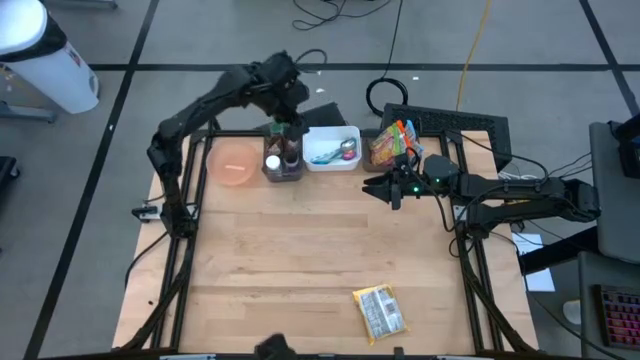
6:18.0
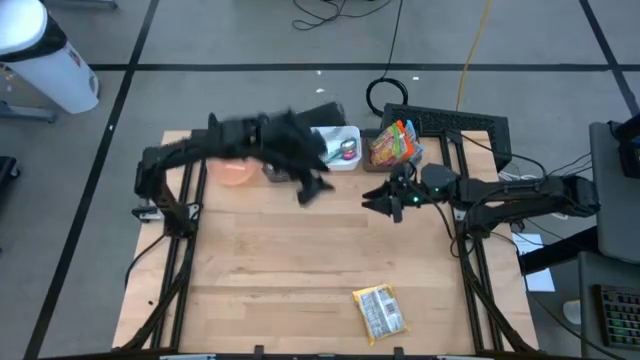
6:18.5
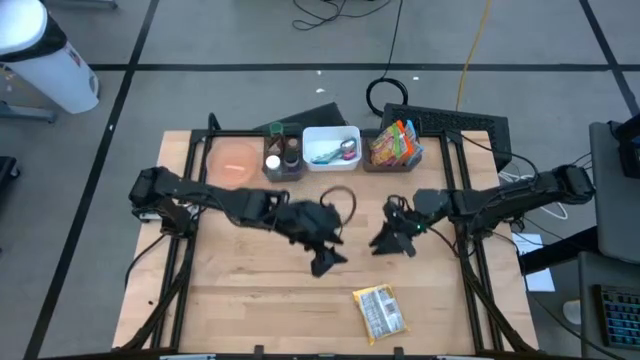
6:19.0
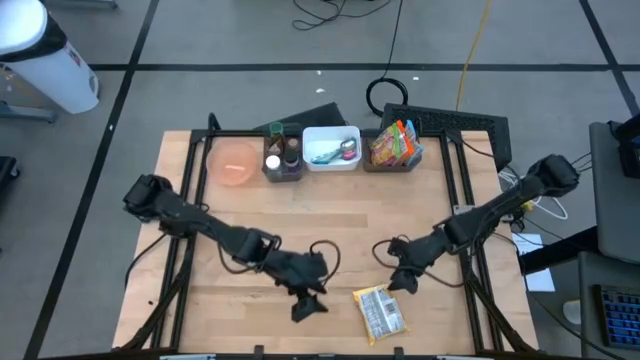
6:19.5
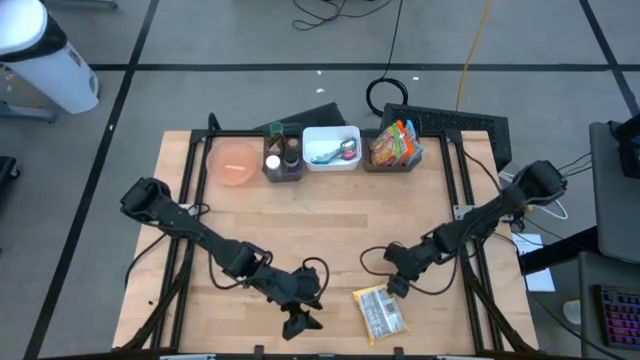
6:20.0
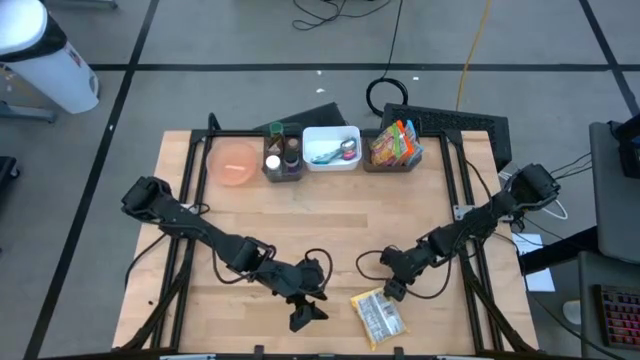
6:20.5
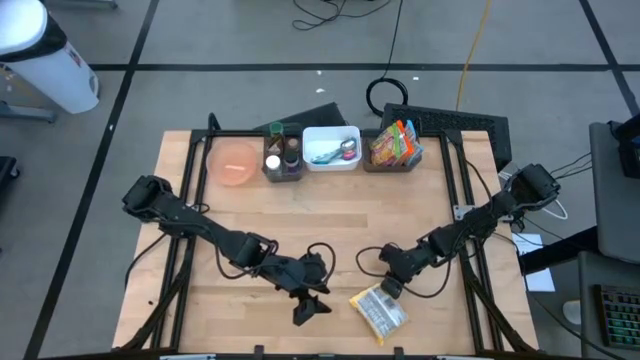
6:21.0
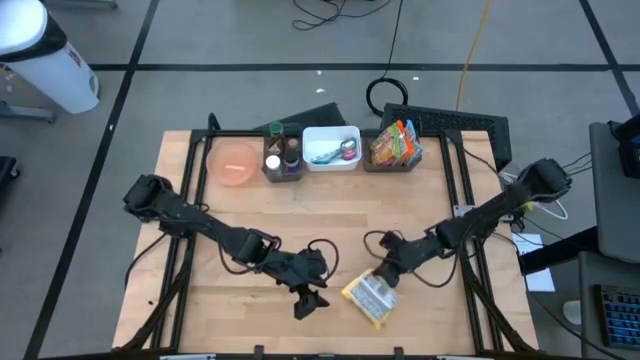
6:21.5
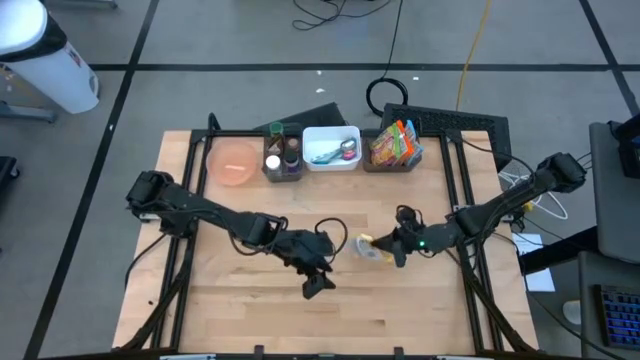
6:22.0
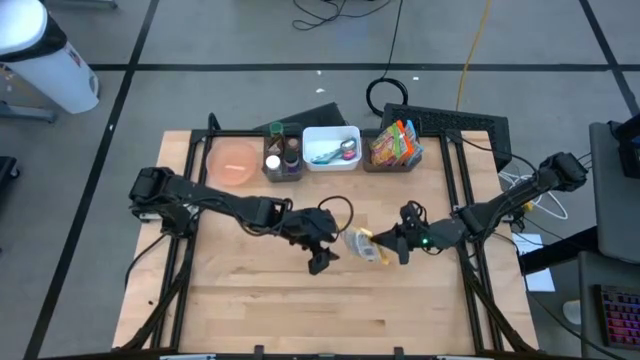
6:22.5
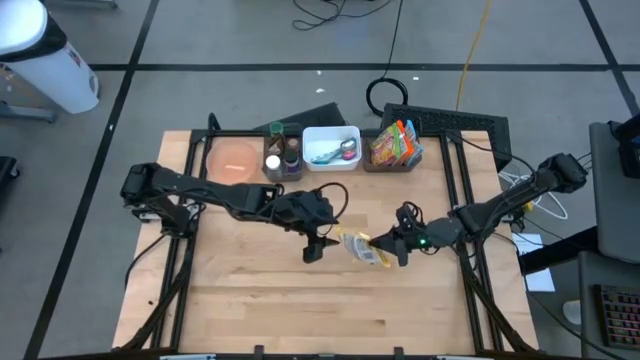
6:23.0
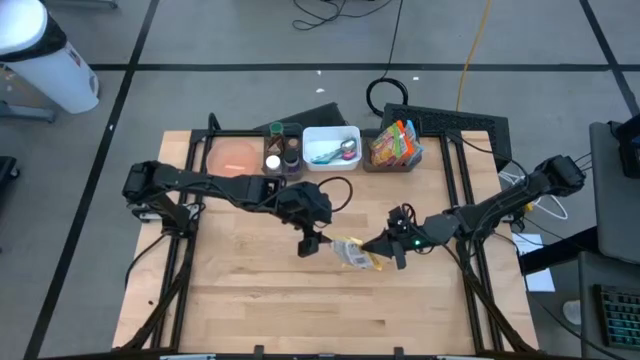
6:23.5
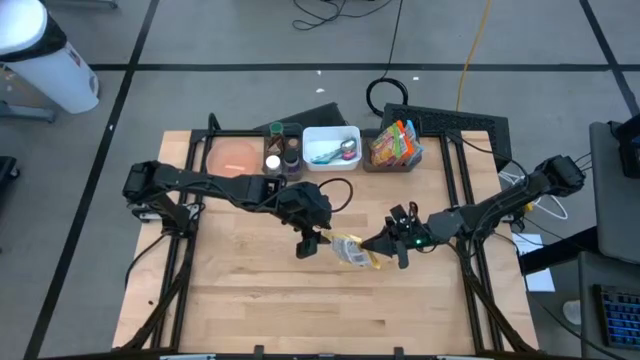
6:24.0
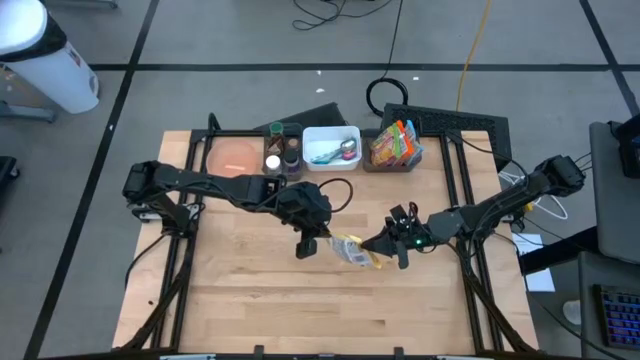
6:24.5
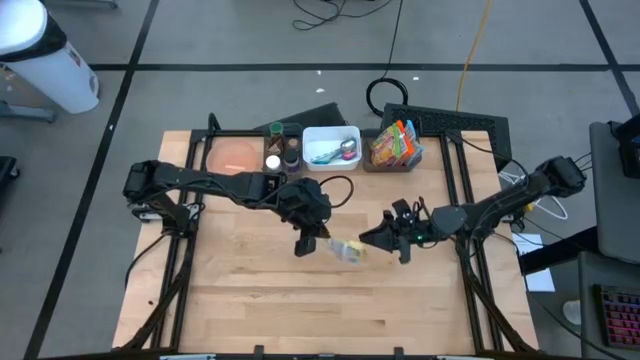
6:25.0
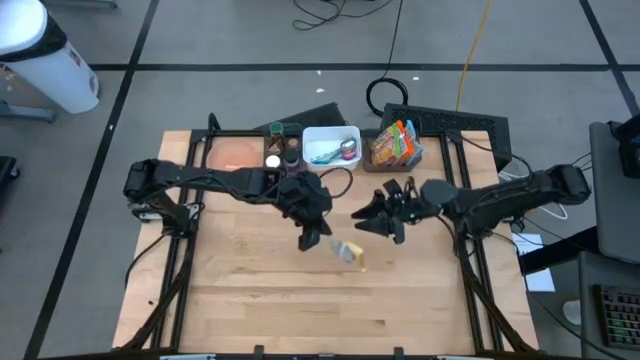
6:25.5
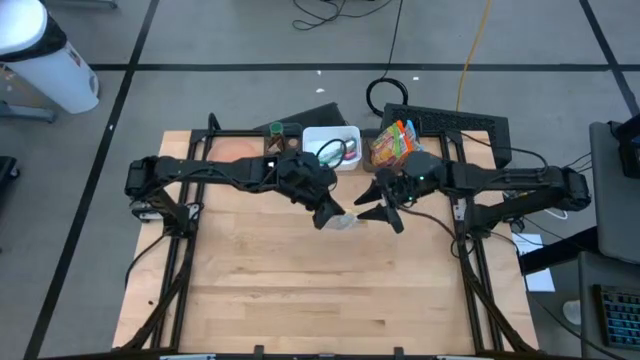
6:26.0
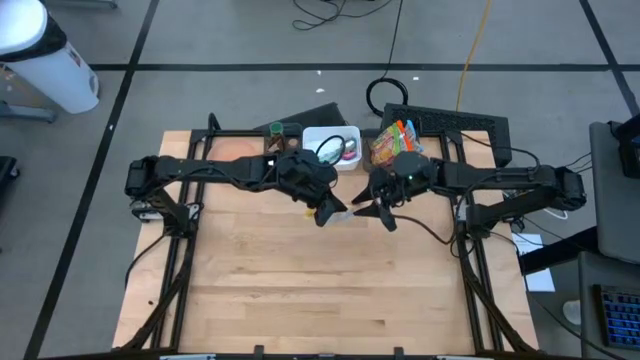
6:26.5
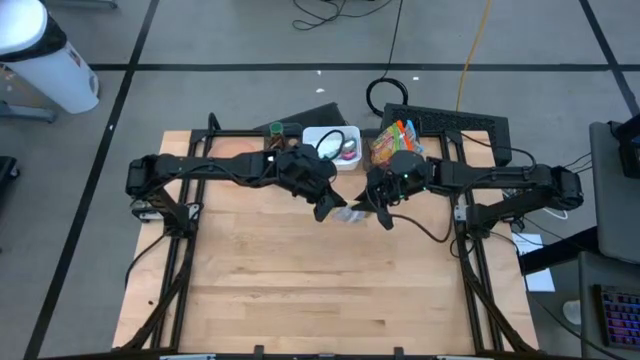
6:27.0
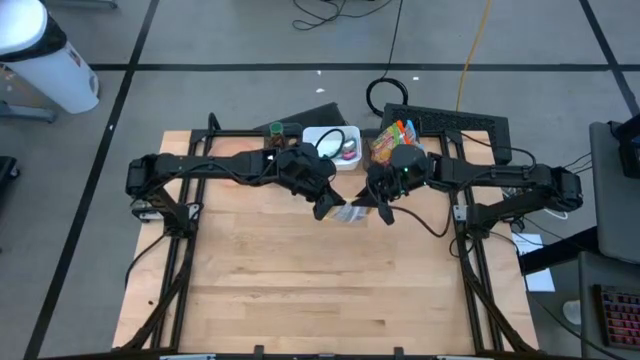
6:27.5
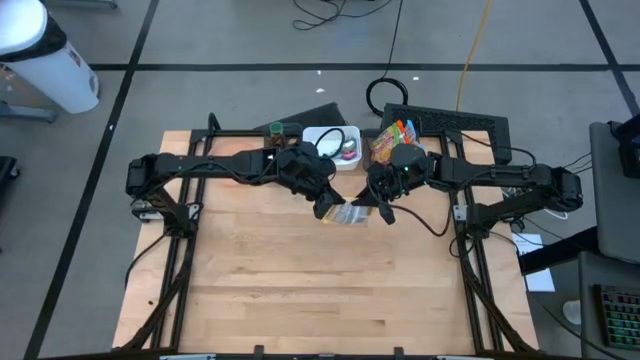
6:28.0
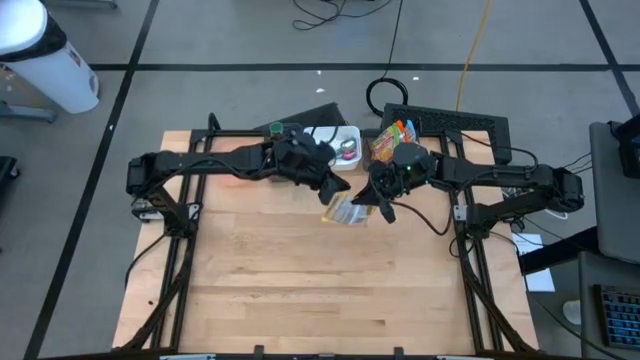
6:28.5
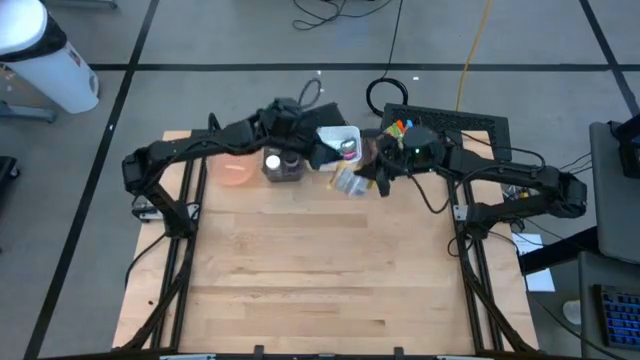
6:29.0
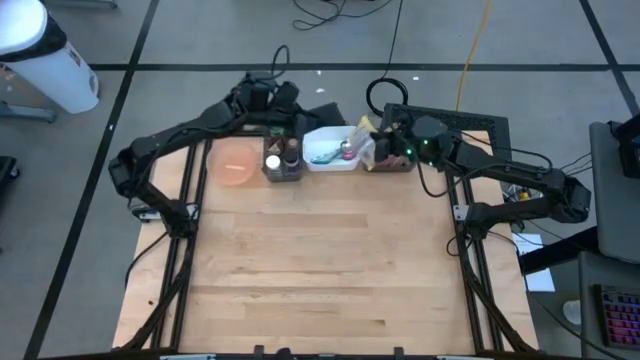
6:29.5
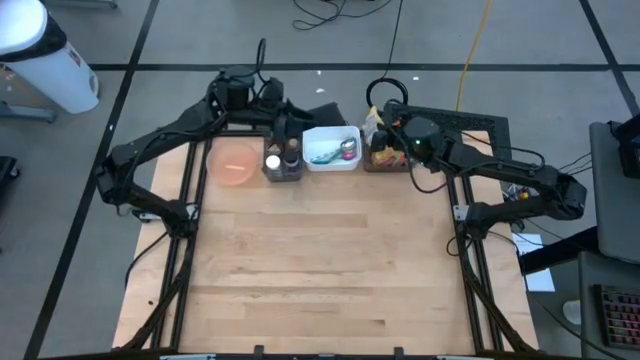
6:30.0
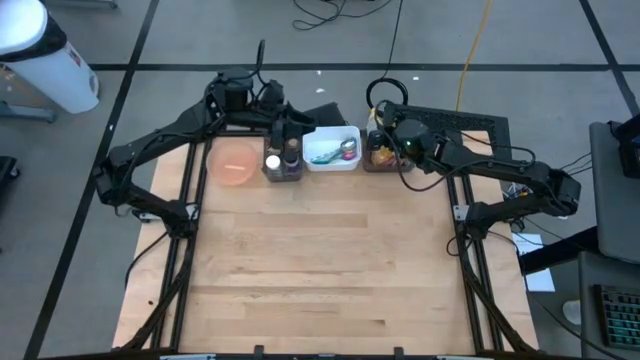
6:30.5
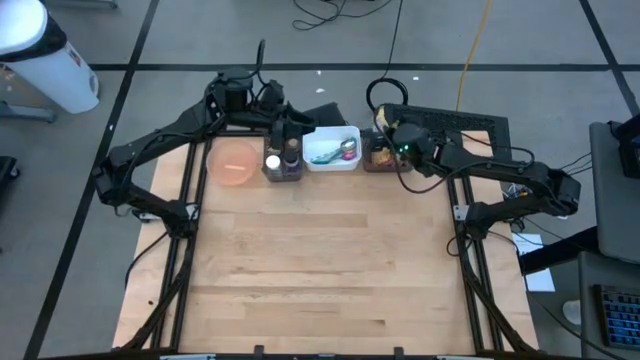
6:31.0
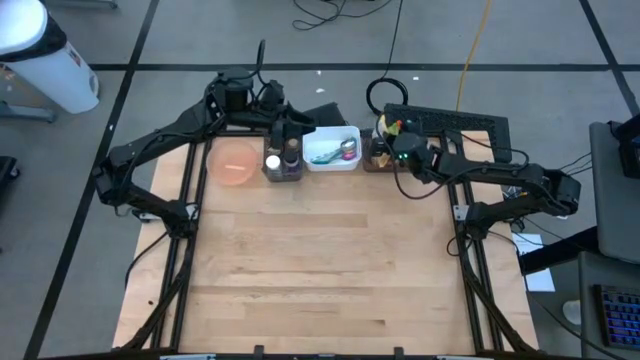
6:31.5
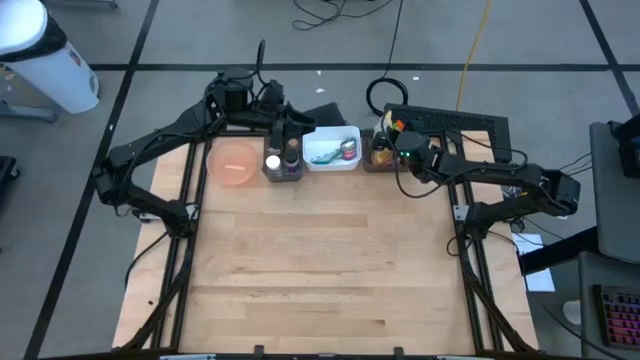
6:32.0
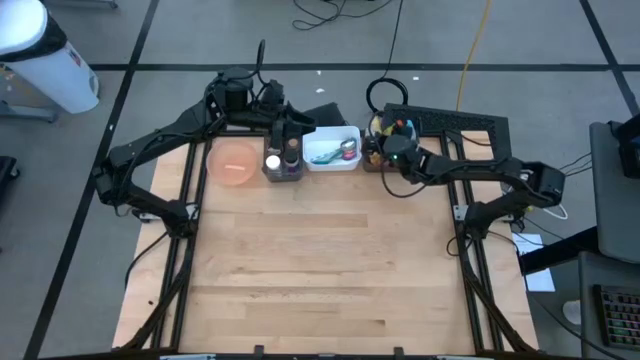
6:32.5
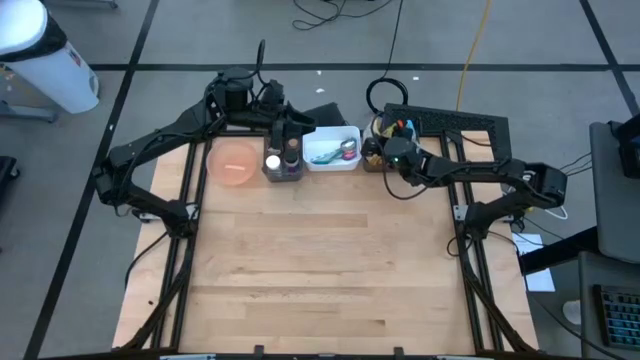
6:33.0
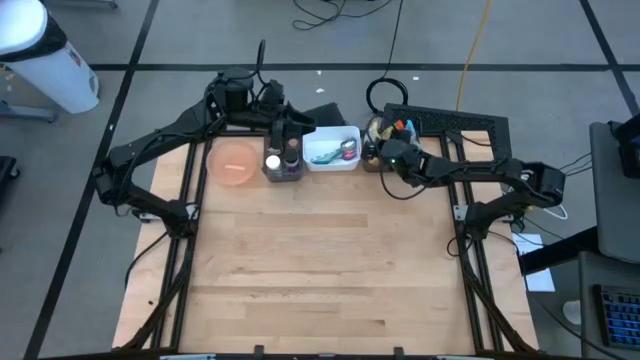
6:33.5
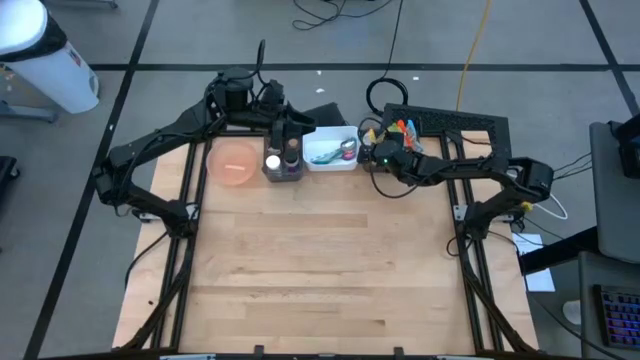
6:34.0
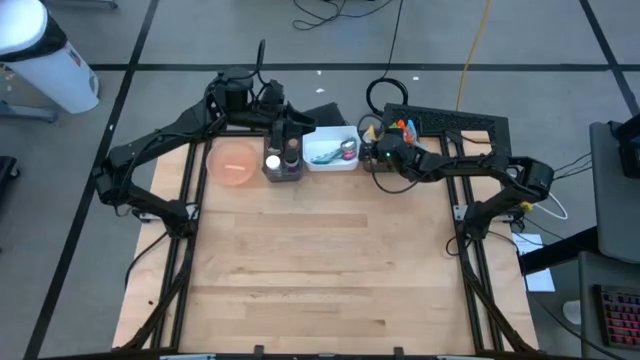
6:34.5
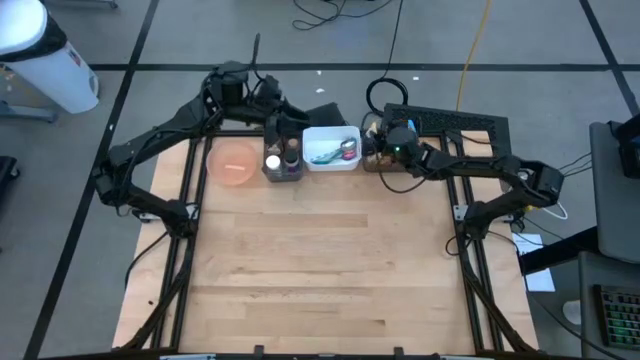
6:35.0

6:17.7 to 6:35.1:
Task: Pick & Place Food Item
Put the yellow noodle pack into the right black bin
